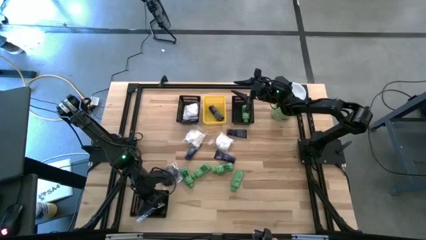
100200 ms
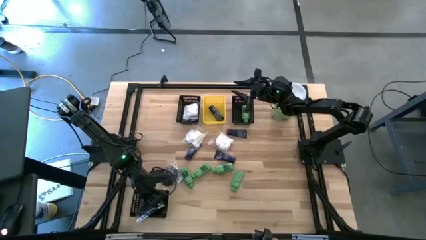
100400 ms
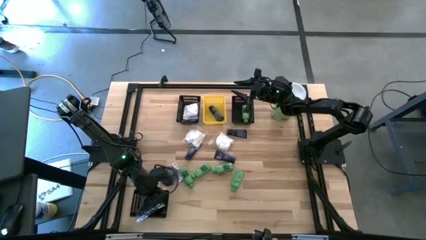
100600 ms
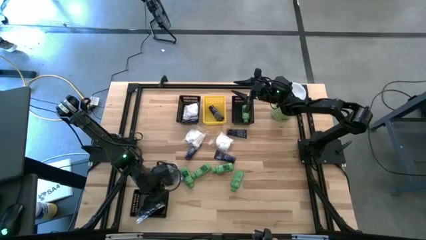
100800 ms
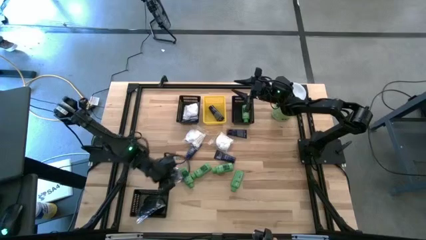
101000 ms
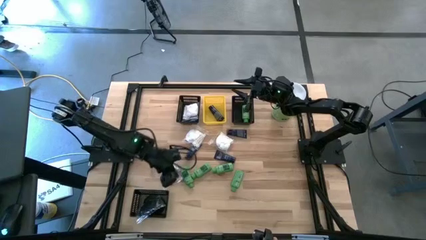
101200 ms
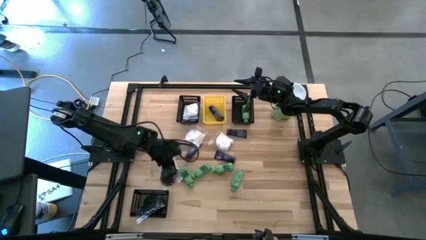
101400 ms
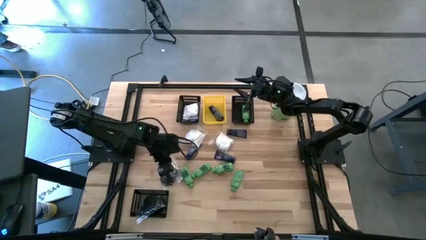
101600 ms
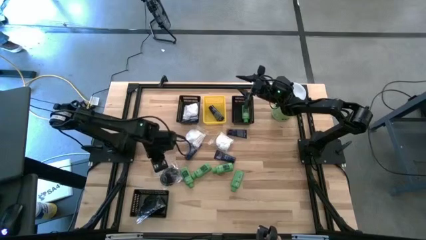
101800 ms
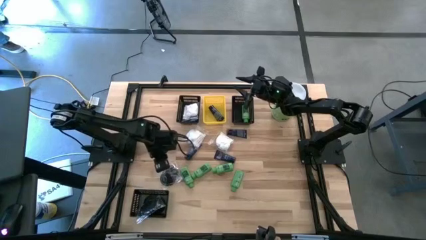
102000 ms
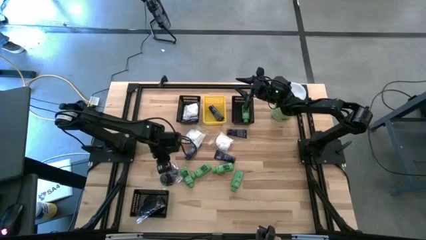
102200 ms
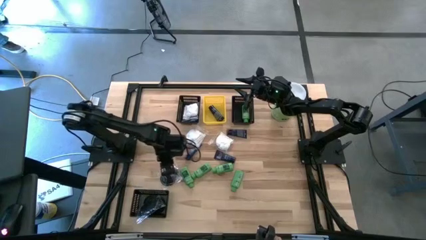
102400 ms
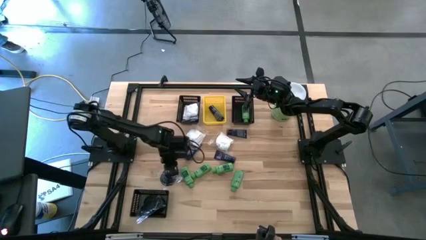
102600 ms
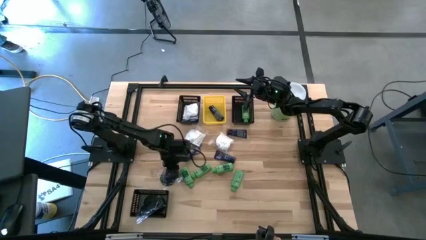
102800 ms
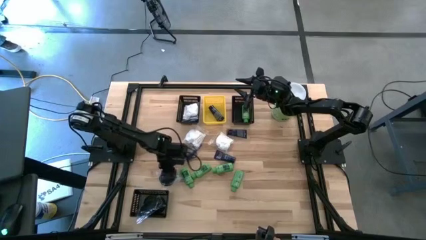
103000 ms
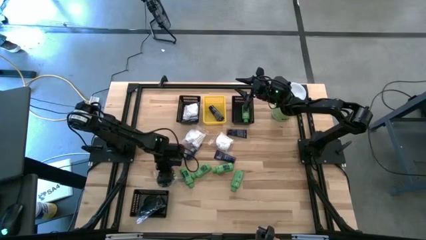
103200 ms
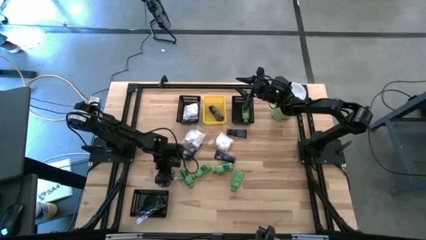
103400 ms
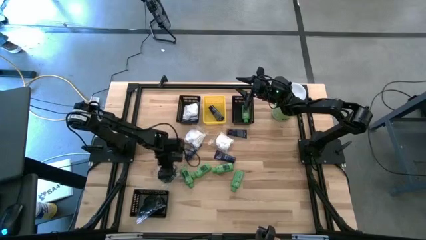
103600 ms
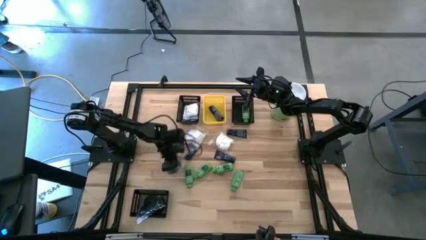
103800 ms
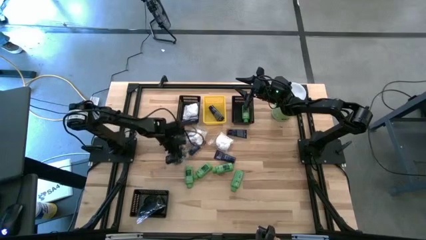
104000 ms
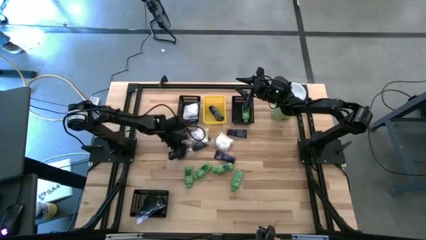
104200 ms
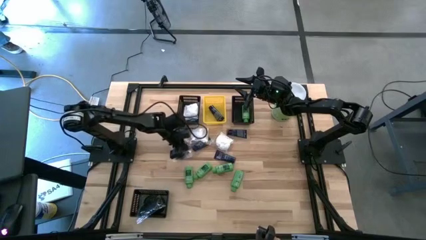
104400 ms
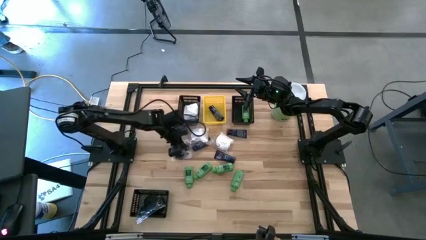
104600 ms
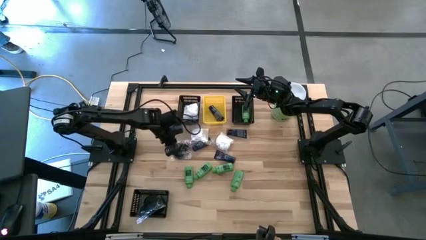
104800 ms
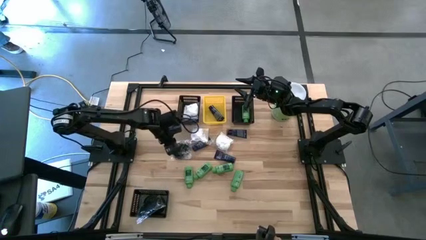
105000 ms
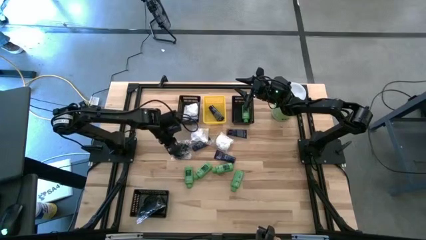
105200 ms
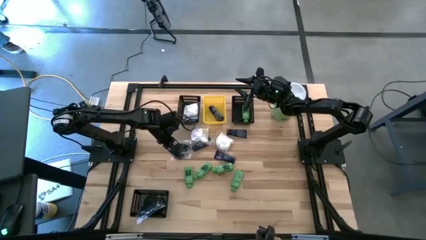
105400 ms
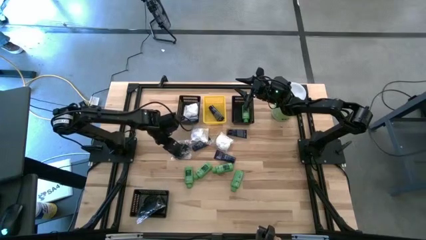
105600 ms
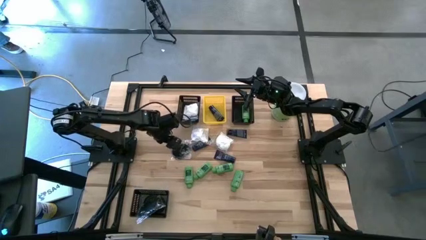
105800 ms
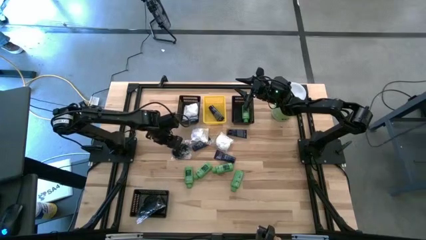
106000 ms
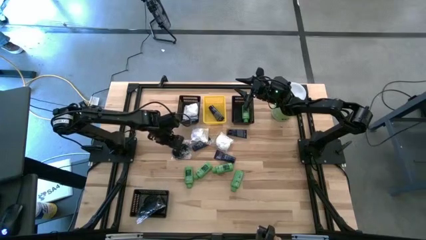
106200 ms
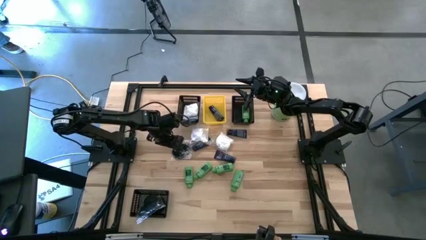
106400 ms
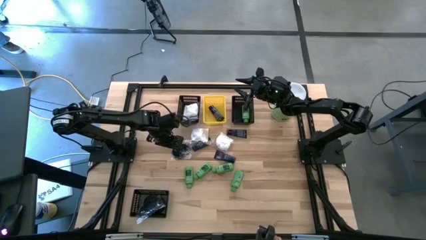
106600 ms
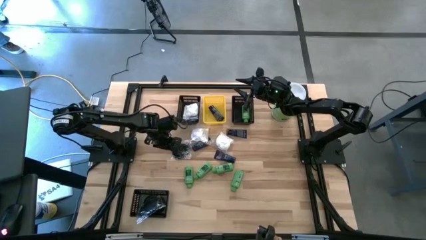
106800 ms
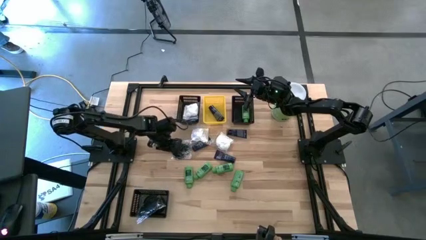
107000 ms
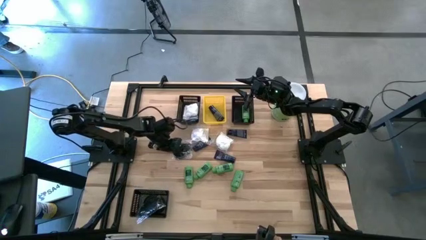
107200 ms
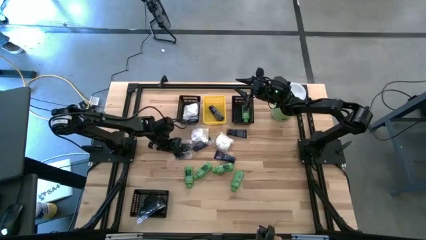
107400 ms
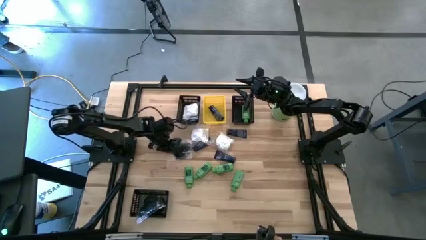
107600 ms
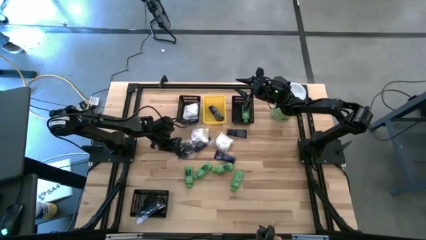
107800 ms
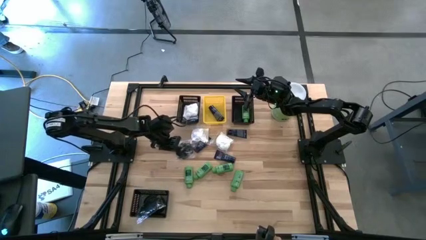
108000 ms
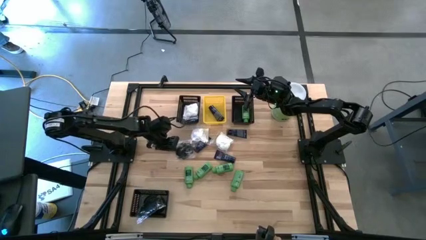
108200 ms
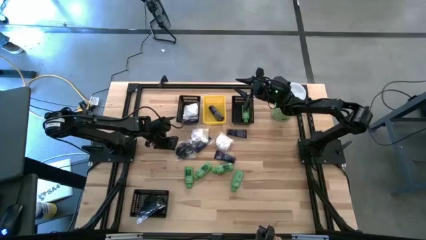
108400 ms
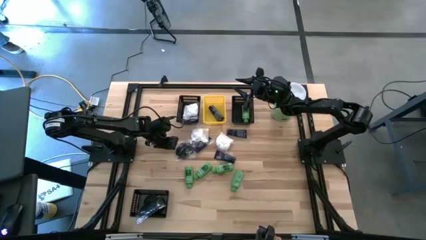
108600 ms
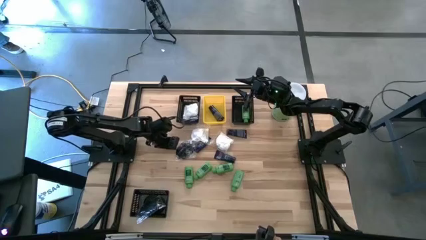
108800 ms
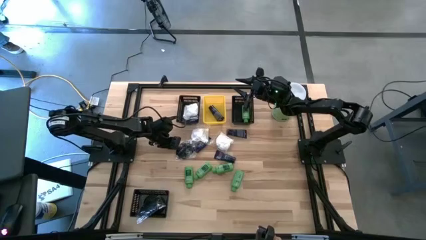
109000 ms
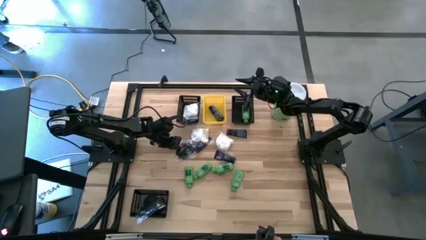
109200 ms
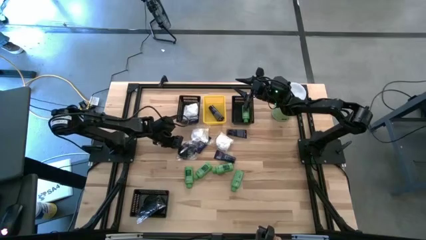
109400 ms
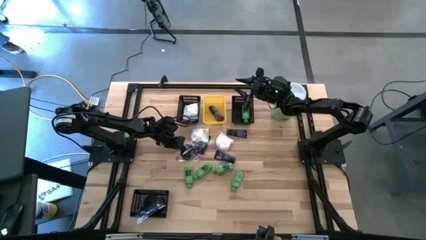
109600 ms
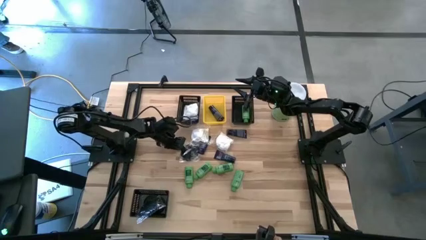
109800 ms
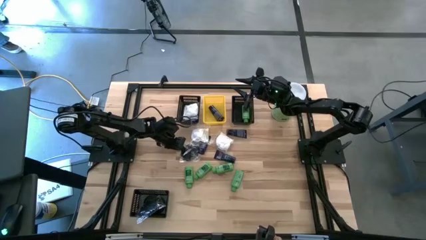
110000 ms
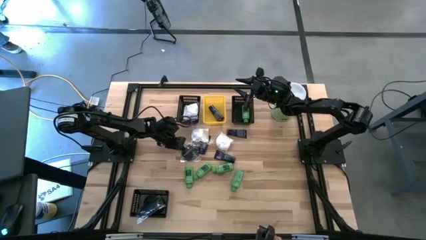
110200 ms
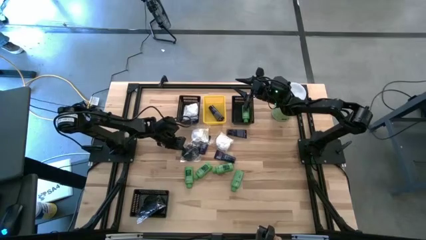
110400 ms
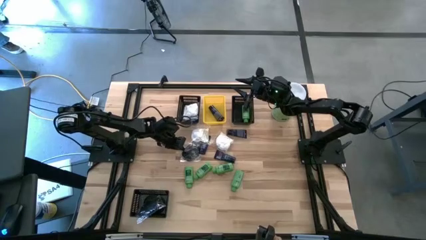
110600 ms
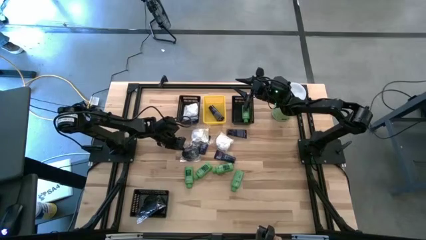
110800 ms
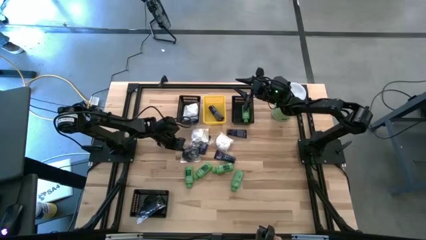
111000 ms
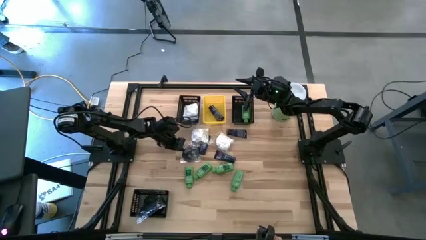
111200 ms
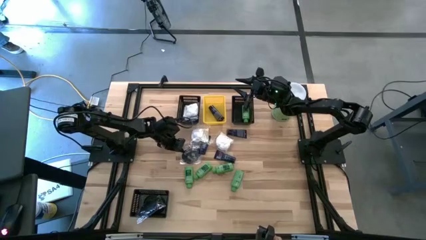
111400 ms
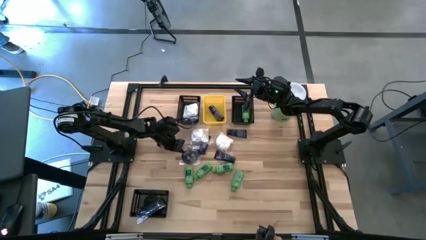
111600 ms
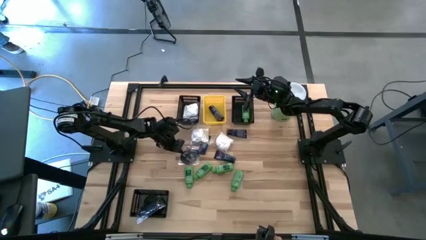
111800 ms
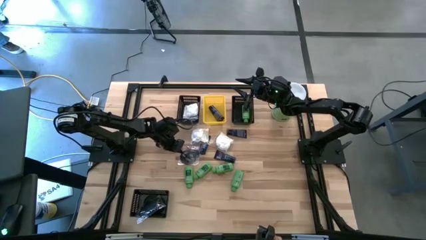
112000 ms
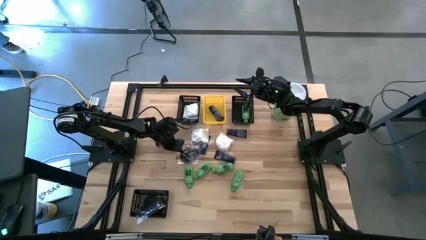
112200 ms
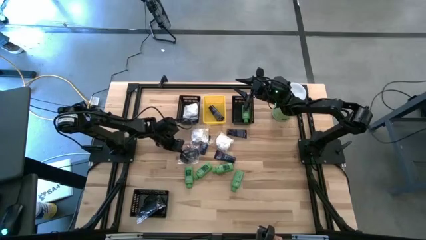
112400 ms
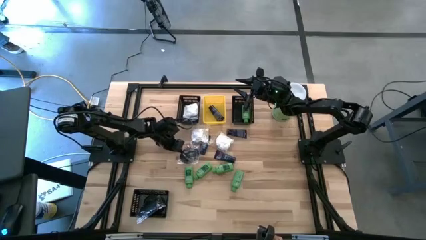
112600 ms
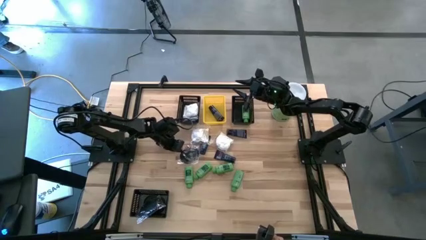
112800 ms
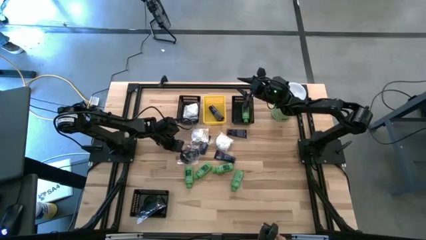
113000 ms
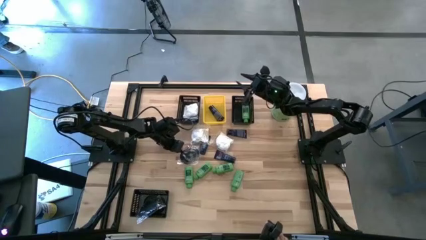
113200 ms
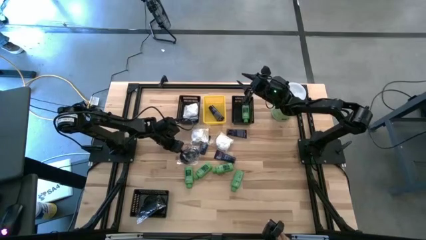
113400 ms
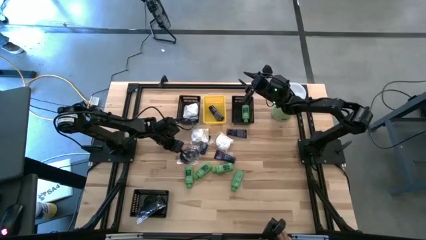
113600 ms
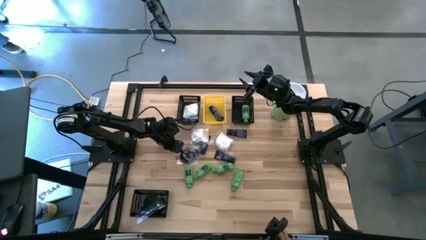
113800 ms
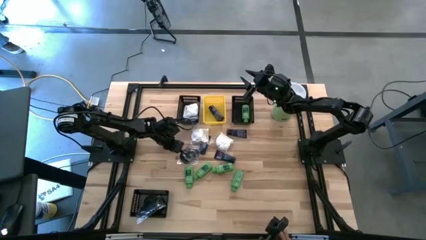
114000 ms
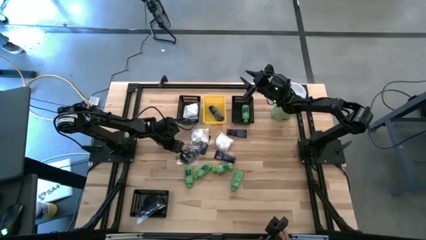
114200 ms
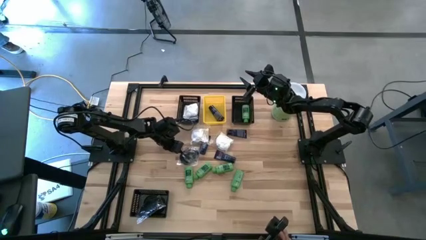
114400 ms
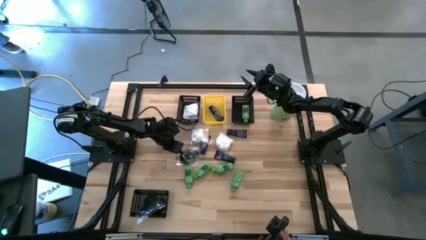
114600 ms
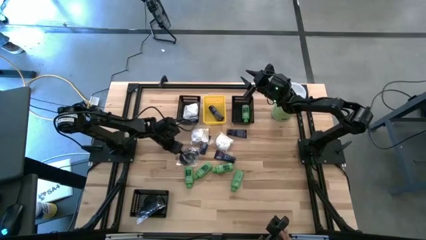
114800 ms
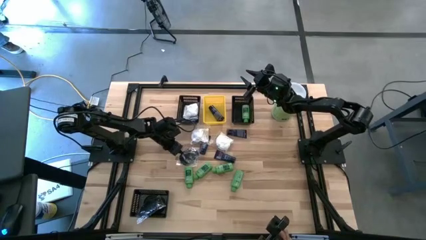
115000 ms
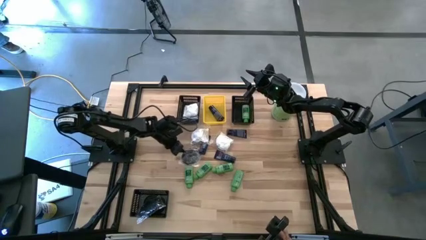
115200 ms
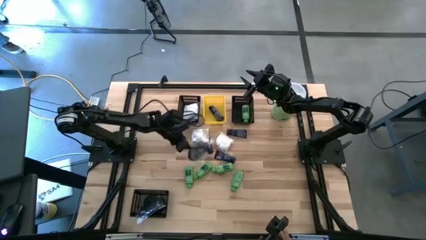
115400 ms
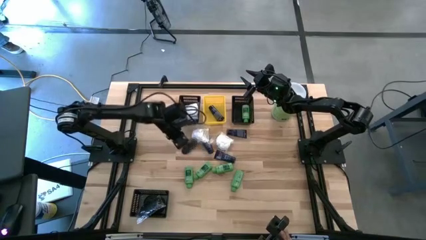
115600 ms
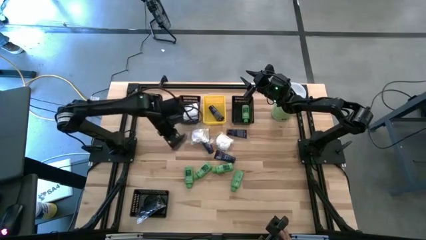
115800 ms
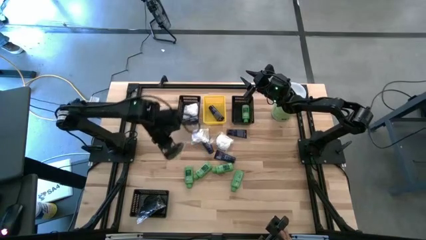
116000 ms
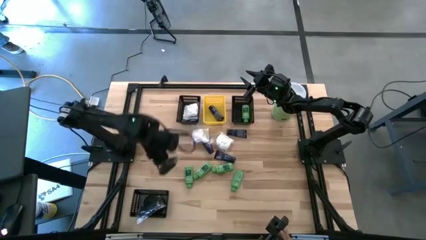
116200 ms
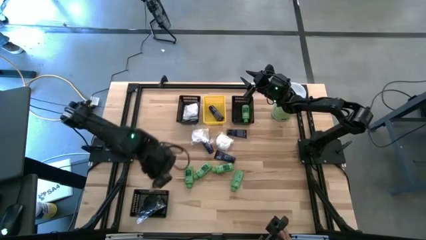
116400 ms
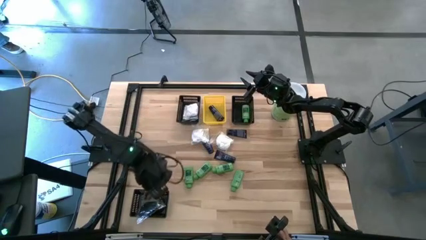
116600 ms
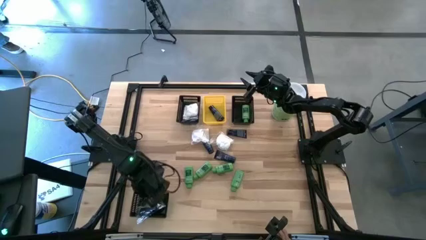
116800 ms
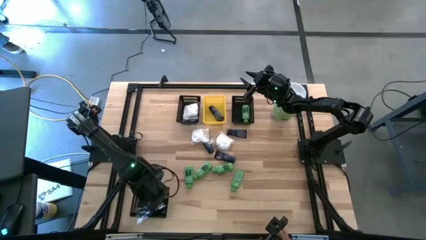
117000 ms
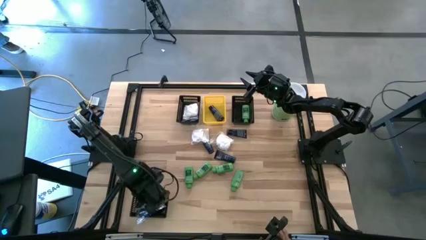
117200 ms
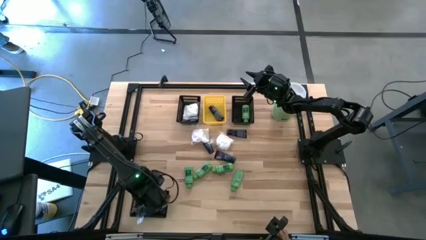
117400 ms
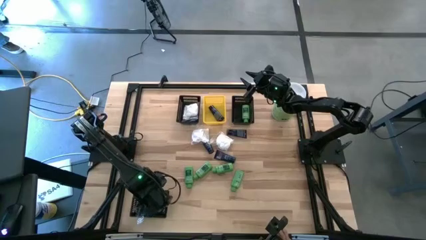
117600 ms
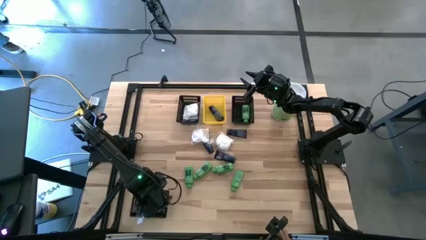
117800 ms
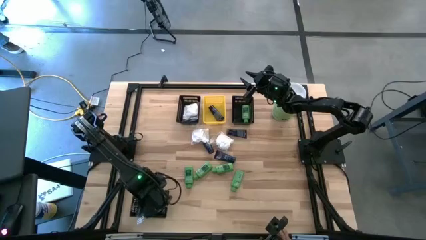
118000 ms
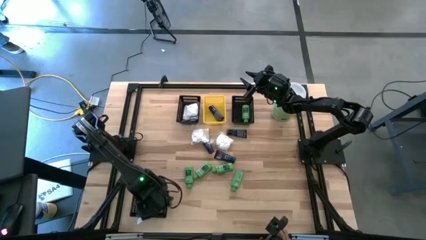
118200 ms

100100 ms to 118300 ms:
Task: Pick & Place Travel size toiletries
Put the black hairbrush into the bottom black bin
